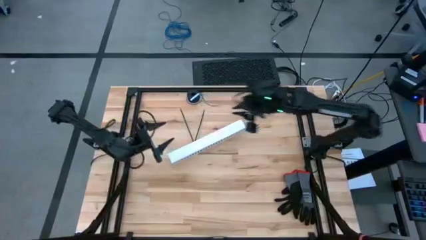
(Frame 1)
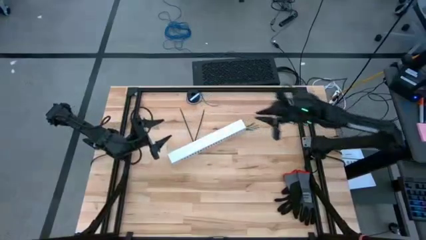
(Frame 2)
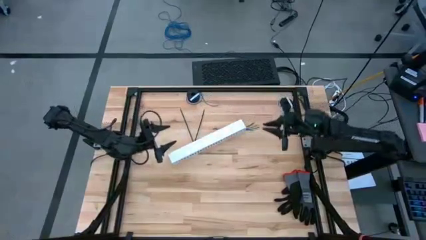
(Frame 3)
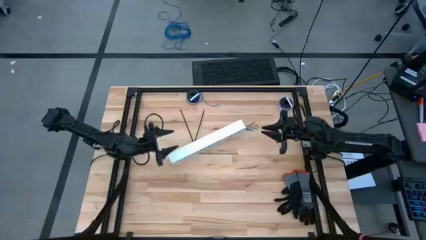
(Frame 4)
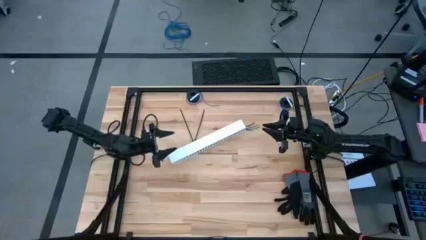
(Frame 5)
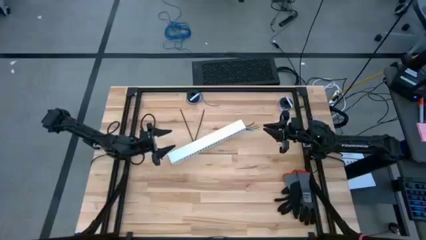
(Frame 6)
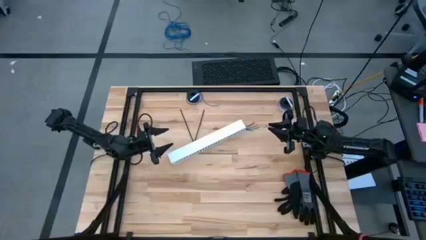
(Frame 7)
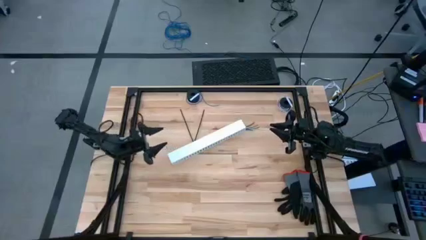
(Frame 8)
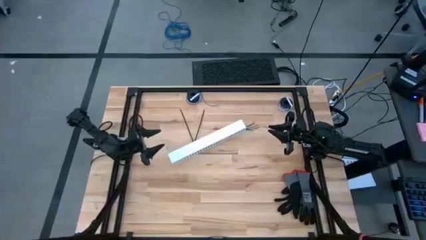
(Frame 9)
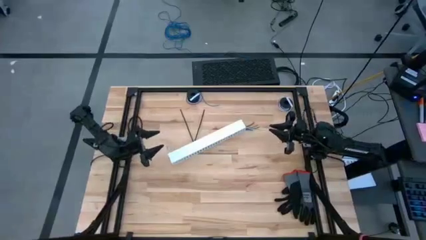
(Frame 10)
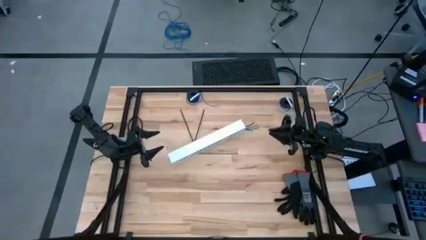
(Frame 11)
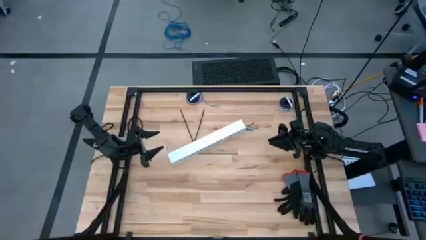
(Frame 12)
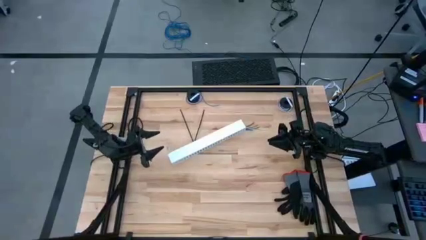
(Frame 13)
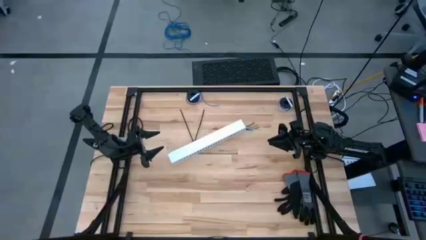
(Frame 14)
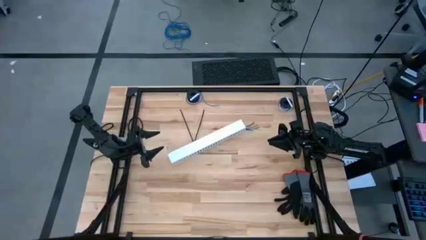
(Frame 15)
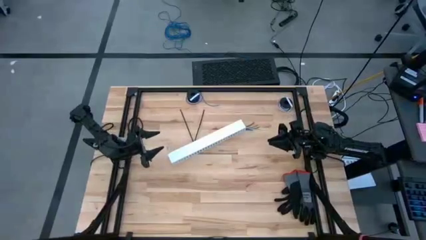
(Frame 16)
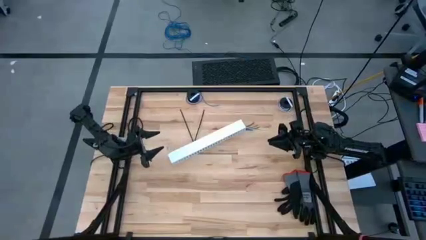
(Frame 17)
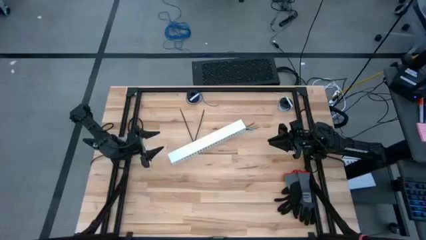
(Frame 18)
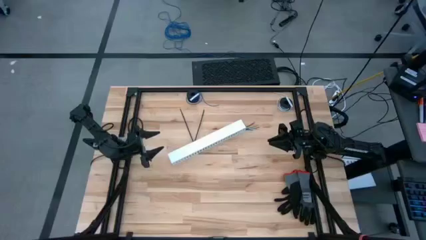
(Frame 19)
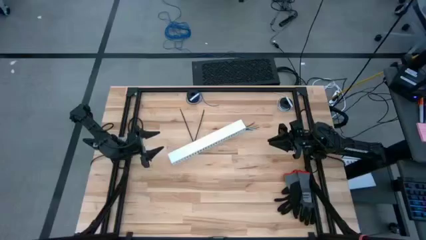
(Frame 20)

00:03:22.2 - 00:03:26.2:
Task: Ziptie cables
Return to Home Position

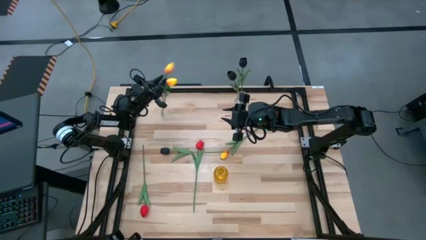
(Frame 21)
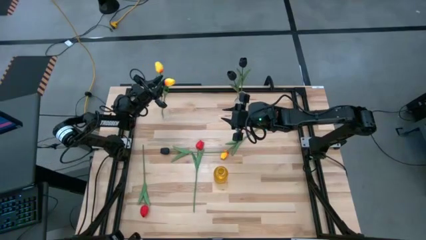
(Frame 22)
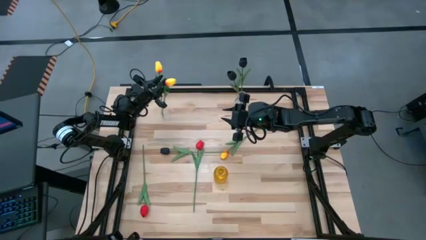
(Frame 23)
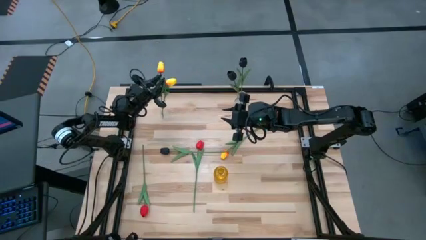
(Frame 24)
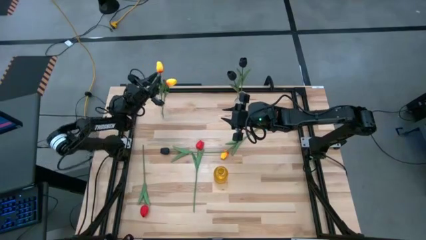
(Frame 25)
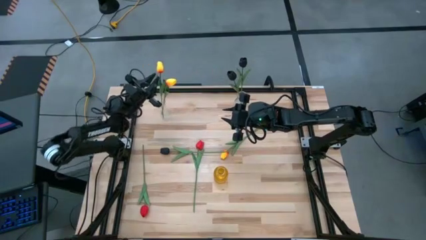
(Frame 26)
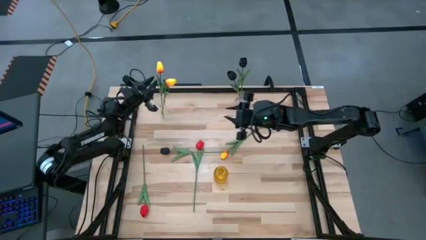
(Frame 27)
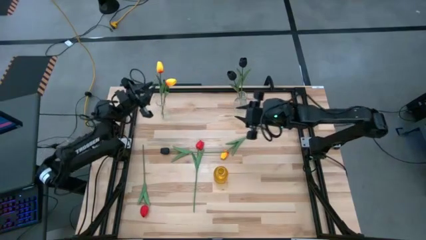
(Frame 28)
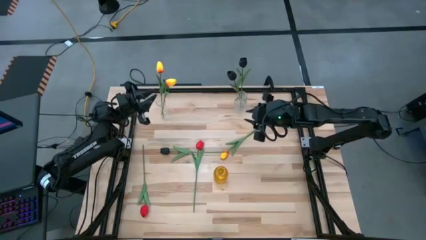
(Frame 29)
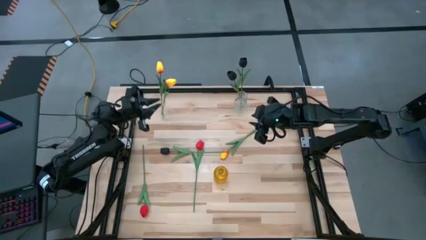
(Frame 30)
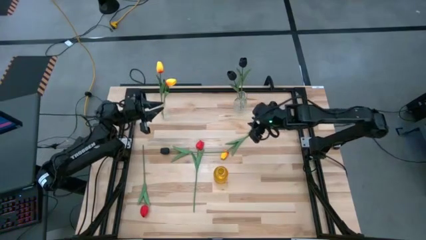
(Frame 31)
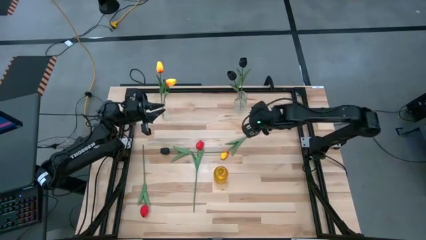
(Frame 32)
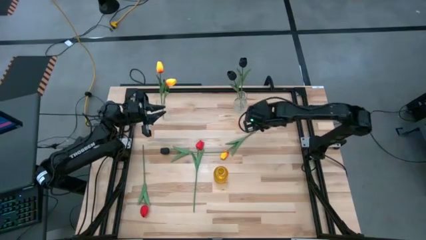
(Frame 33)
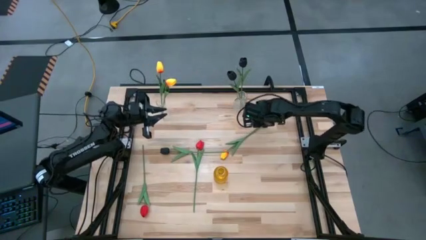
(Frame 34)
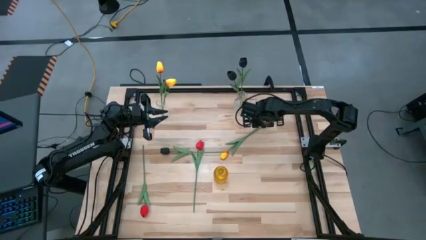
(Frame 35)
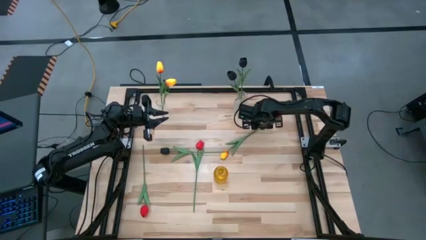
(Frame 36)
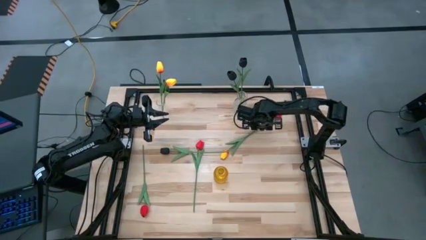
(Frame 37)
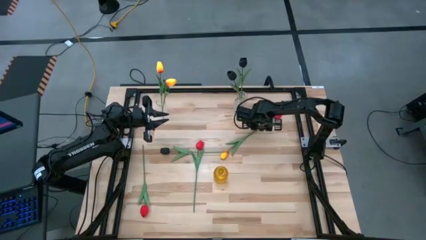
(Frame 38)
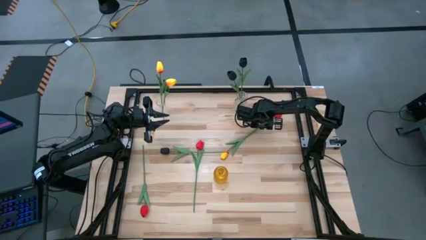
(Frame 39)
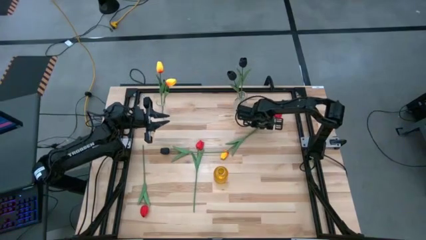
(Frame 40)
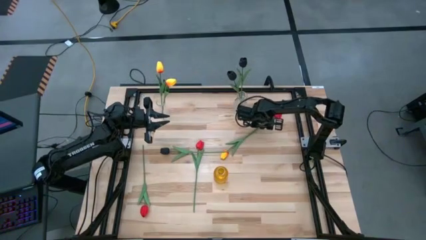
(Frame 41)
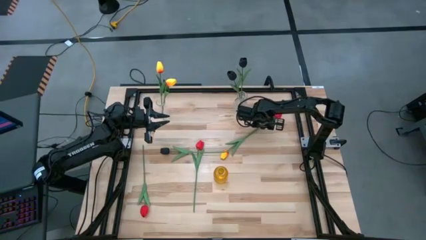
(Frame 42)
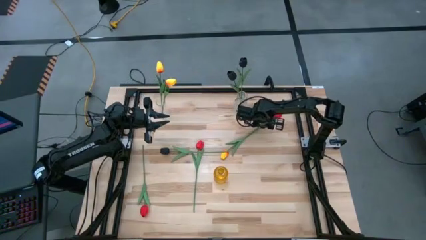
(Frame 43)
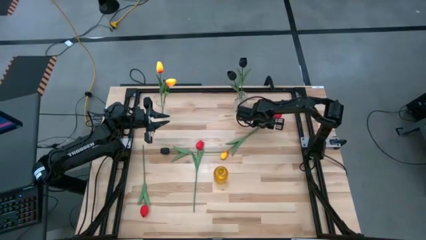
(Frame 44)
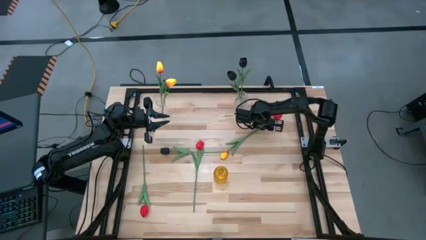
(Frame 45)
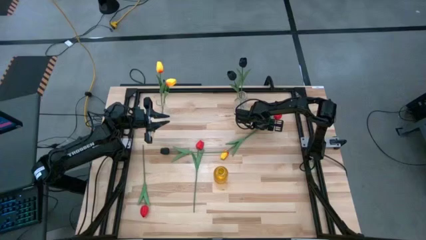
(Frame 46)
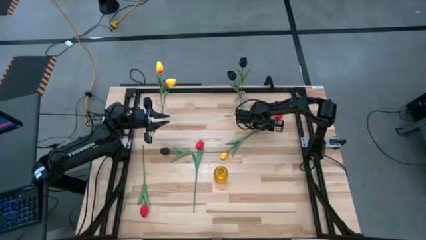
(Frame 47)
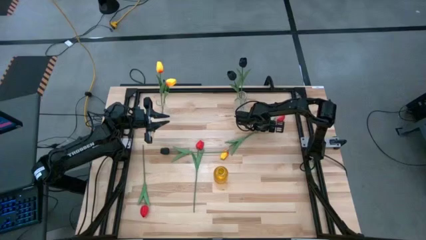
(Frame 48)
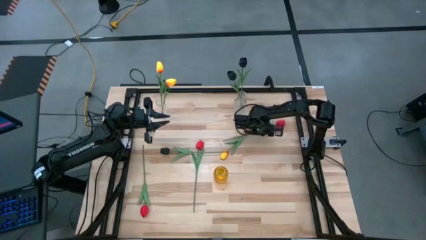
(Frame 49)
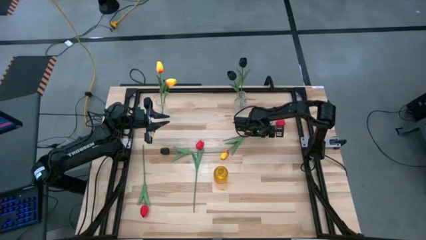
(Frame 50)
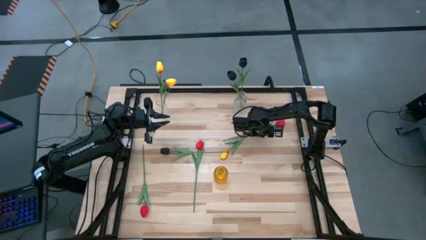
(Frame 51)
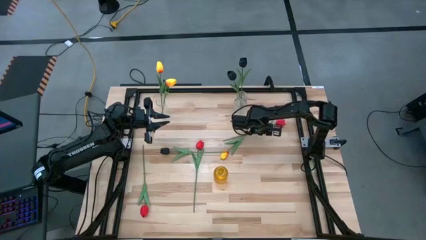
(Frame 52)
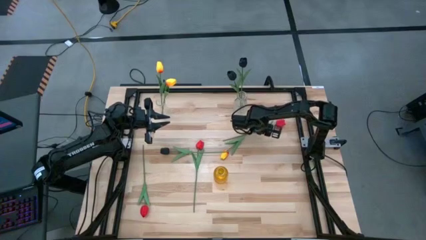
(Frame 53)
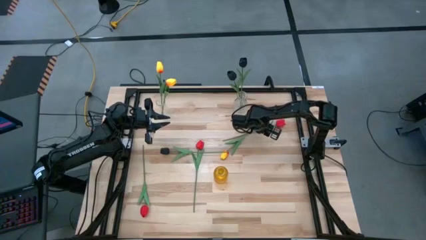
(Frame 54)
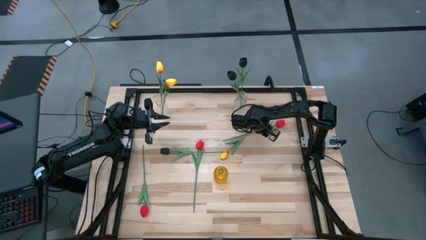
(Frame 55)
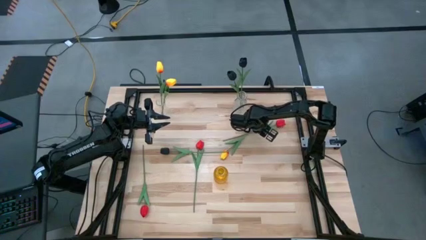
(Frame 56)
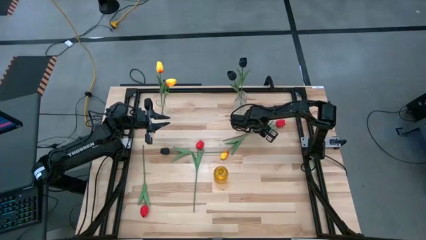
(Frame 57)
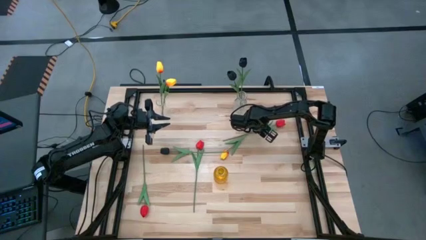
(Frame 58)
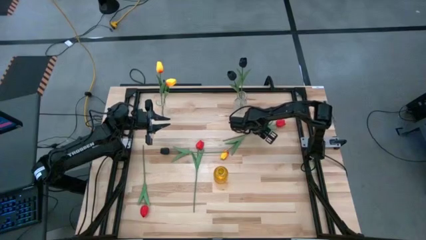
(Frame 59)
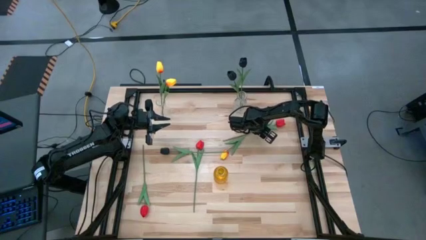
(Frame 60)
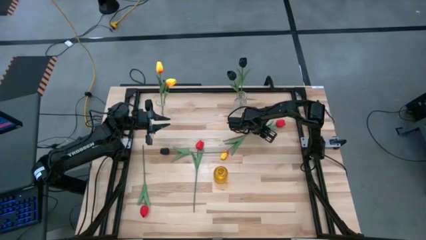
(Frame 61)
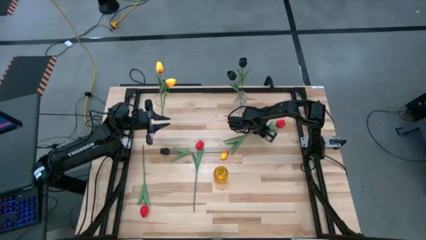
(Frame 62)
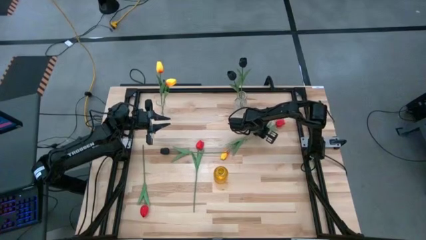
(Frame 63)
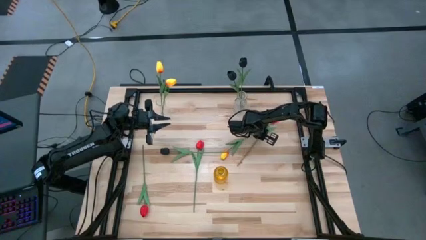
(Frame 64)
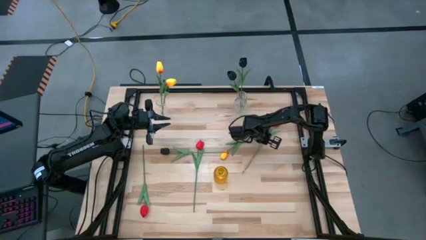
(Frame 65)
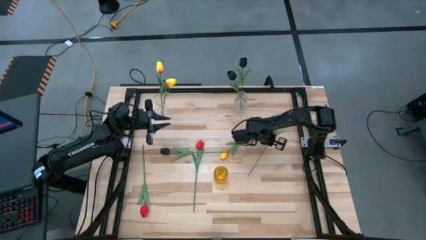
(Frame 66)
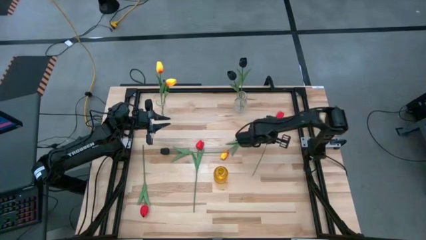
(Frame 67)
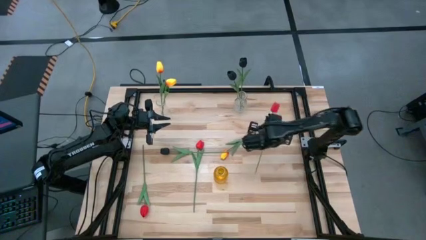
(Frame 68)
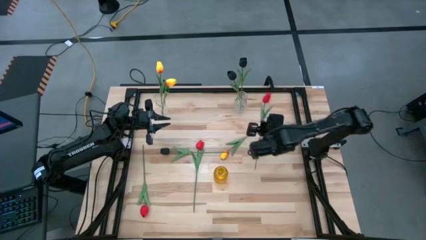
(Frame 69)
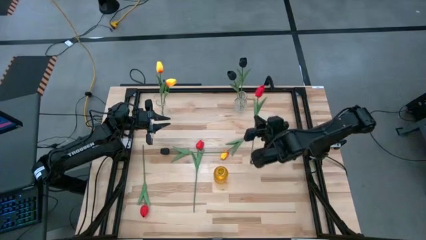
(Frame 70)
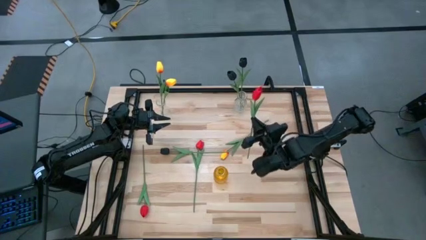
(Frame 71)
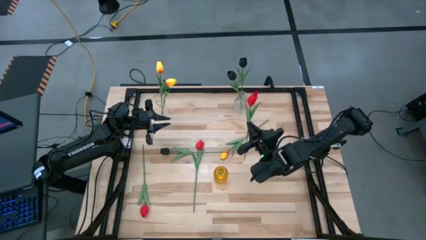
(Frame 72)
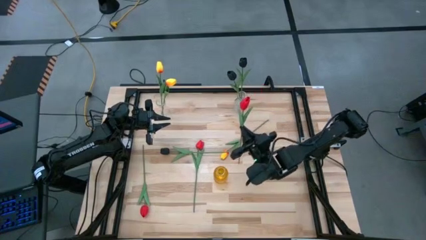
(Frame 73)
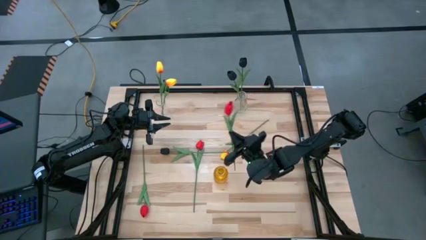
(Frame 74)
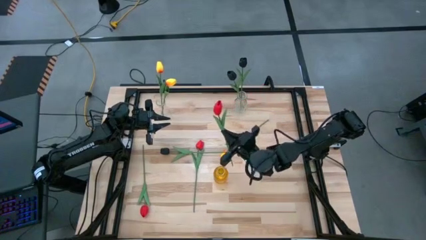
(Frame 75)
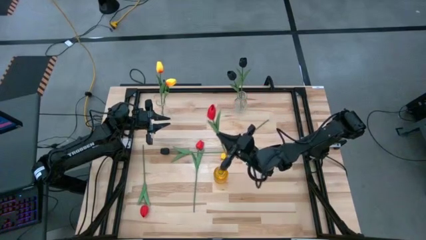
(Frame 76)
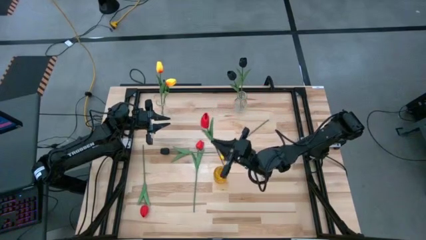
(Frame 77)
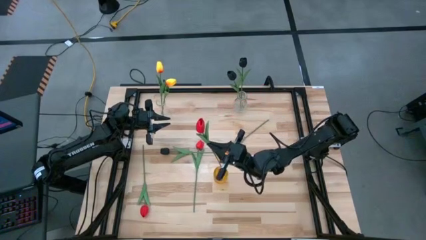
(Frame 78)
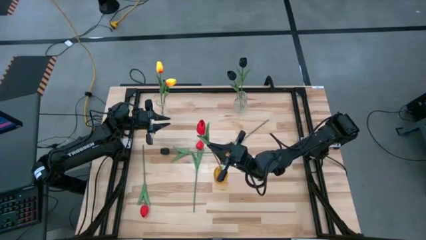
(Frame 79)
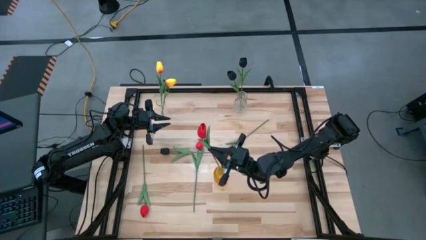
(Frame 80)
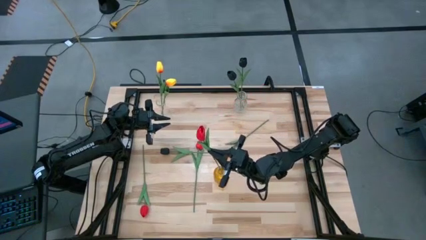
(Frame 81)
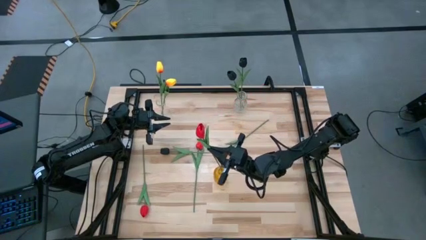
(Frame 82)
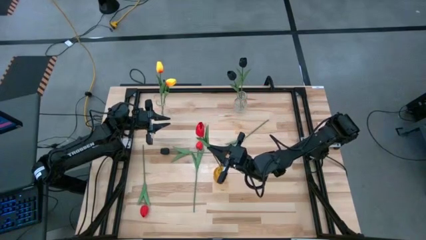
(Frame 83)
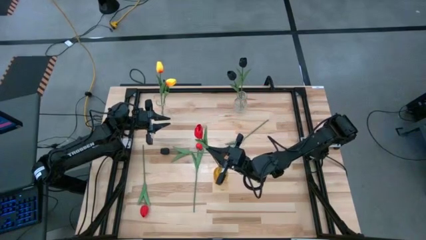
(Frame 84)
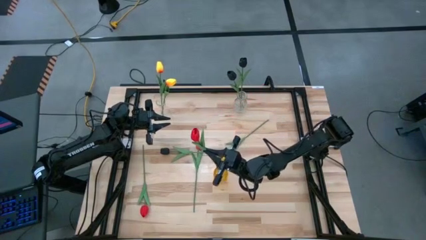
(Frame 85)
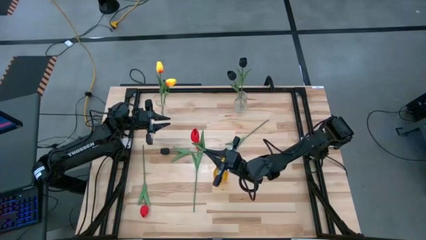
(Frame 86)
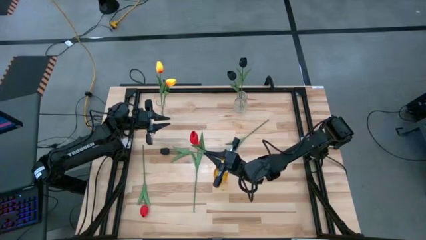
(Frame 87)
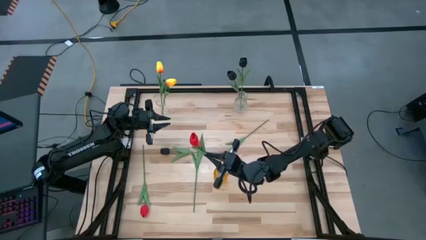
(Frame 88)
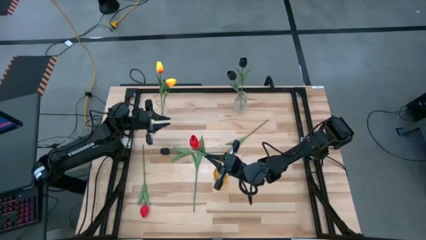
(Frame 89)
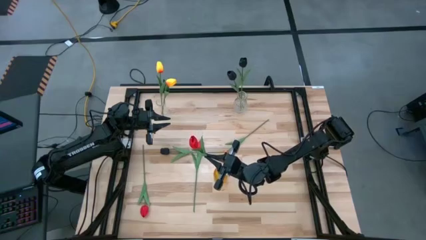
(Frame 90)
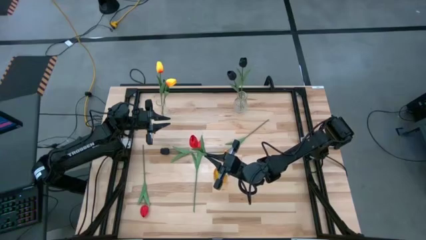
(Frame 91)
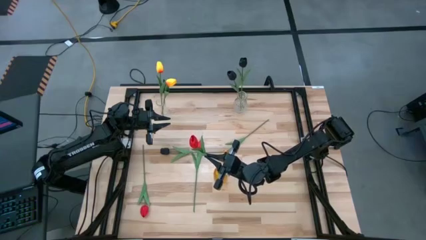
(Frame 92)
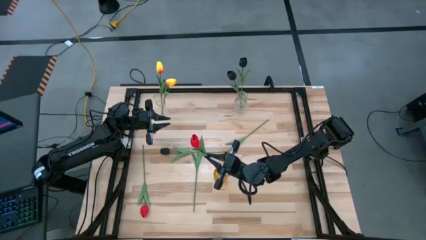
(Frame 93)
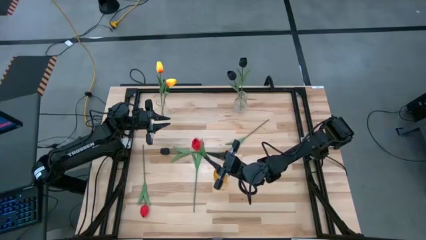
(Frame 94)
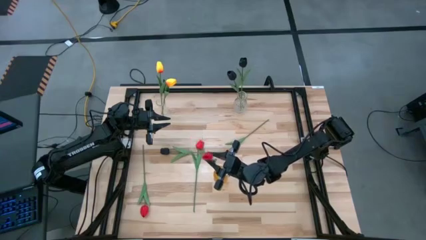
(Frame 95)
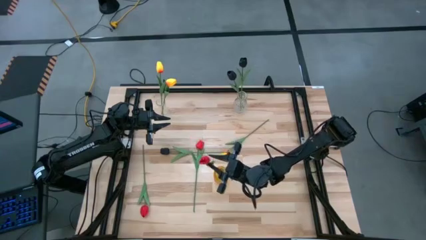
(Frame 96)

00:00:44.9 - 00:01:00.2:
Task: Sort flowers into vase by color
Put the top right red flower into the yellow vase
